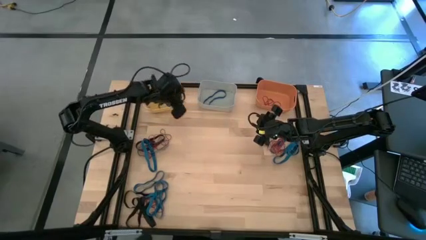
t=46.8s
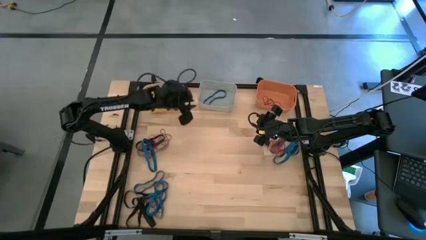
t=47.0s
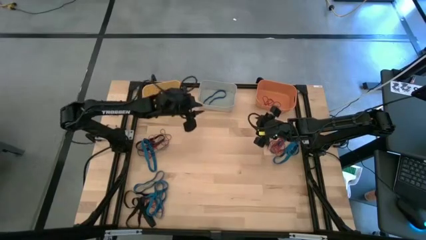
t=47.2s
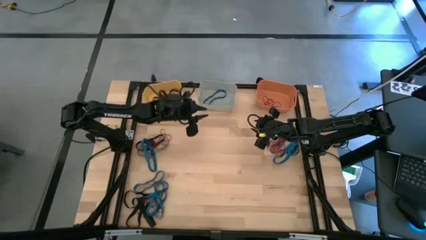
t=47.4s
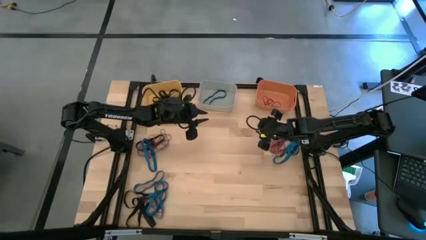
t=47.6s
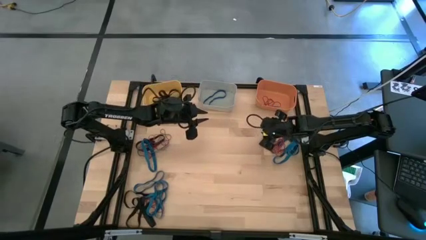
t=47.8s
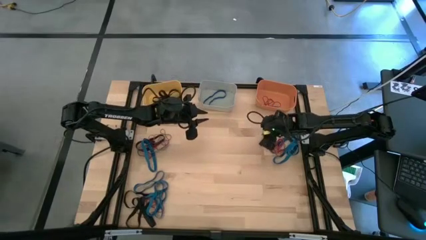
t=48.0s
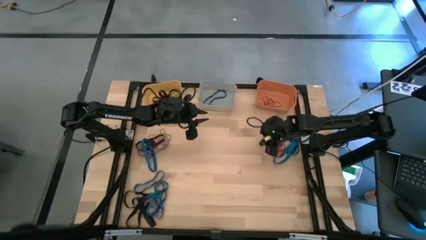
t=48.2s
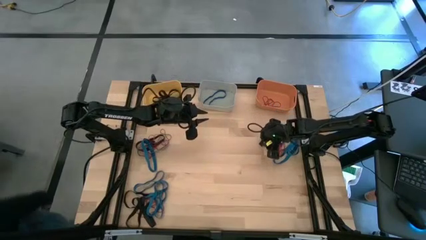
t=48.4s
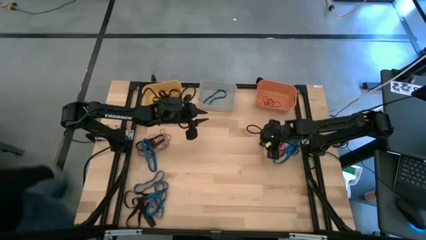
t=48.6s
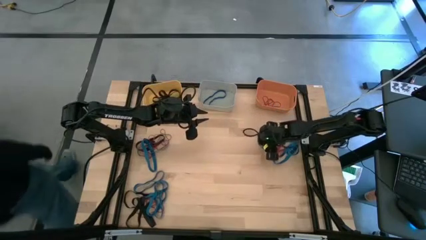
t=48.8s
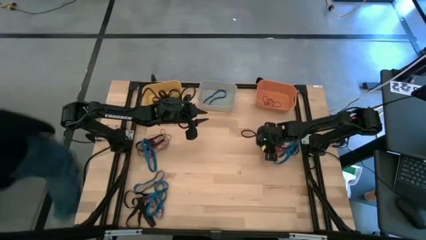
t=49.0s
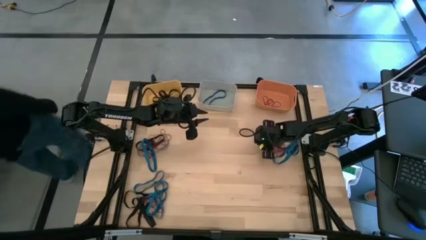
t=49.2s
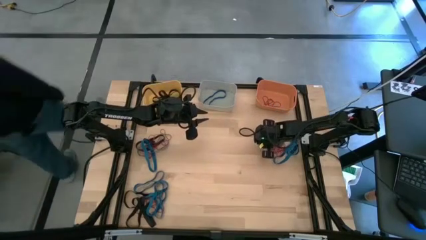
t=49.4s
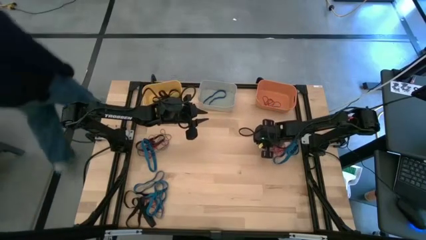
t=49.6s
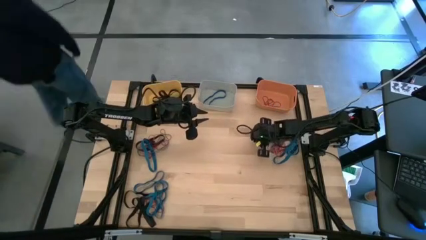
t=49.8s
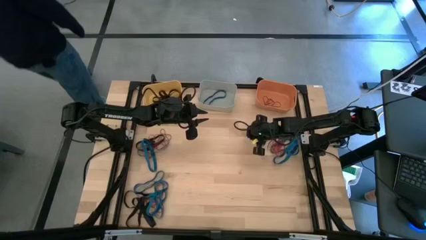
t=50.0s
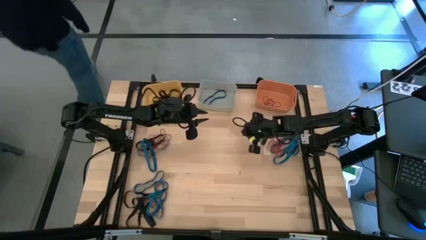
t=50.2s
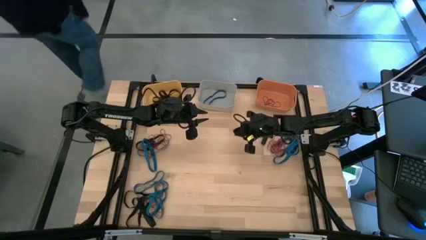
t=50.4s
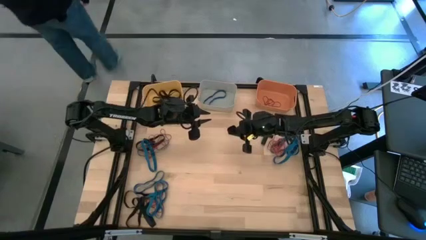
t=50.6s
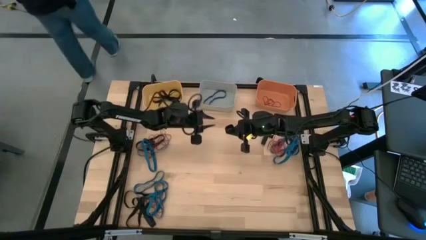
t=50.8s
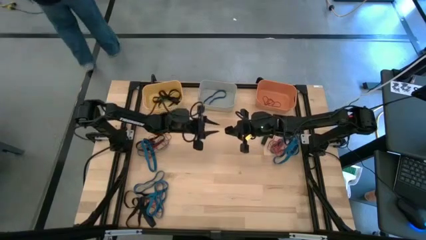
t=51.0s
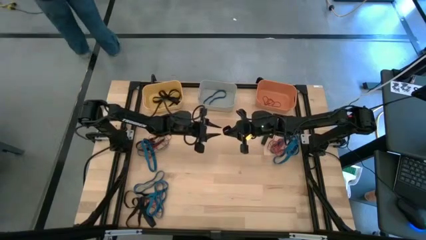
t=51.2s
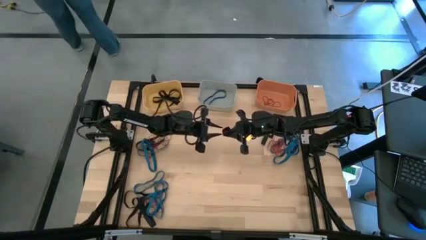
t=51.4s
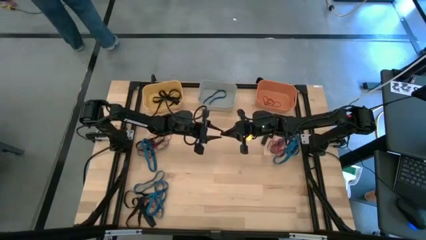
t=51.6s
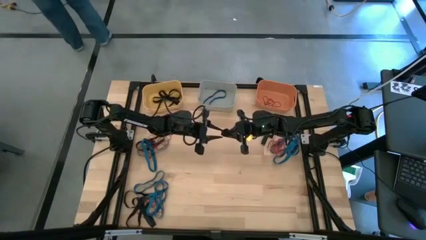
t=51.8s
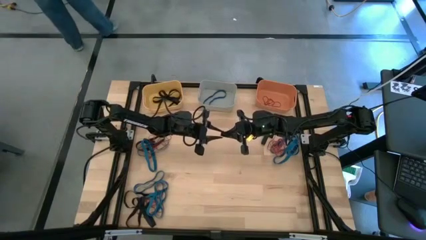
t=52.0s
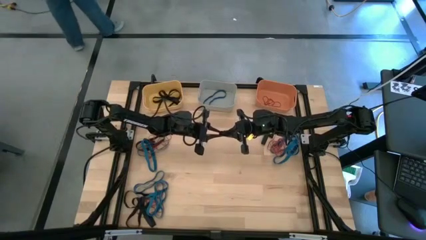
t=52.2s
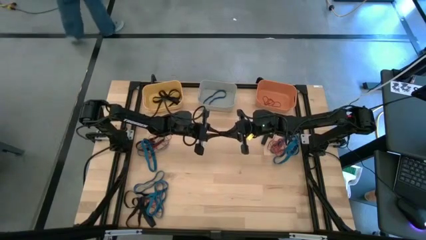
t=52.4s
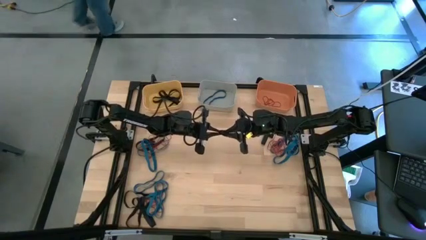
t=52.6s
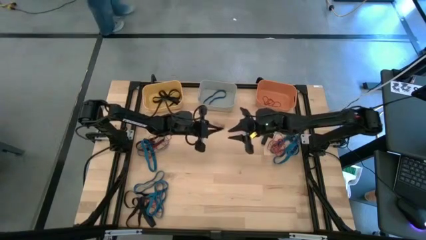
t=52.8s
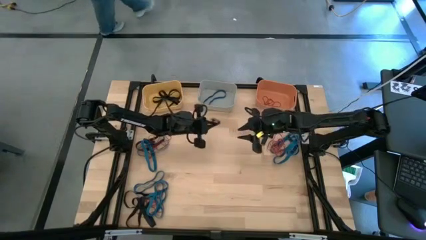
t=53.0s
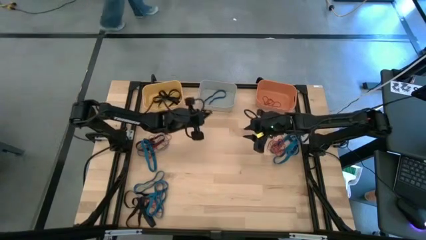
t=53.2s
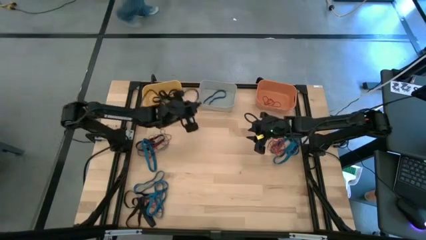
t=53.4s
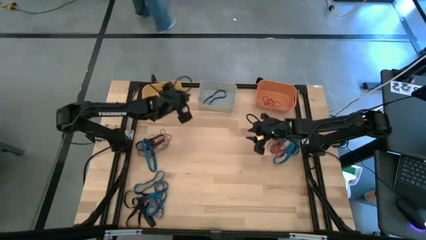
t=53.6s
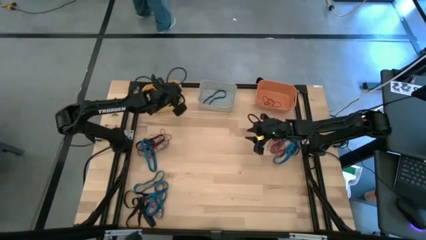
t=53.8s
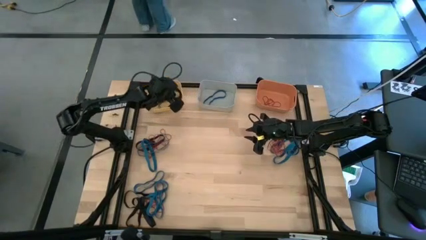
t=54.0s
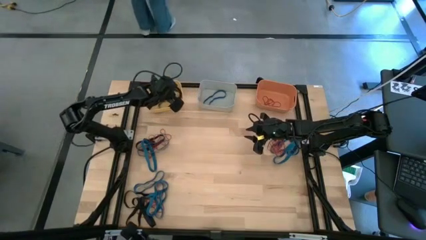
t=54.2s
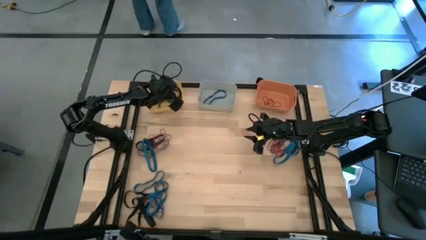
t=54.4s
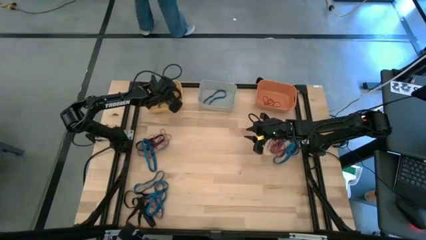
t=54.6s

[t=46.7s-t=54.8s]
Task: Sort rubber bands into baskets
Put the black rubber band into the yellow bin

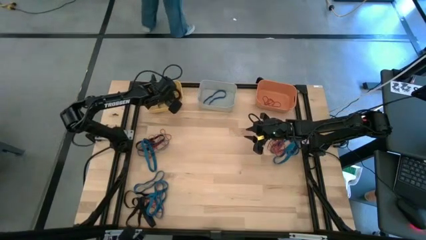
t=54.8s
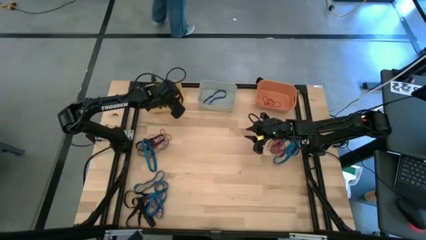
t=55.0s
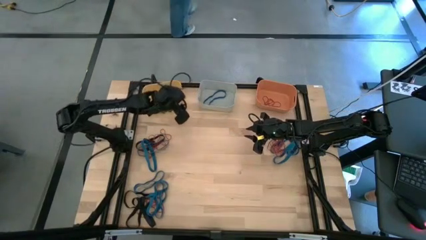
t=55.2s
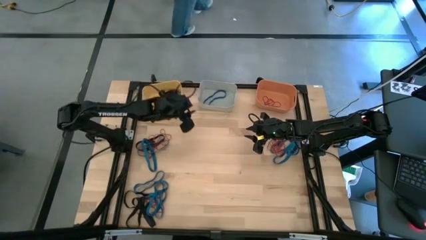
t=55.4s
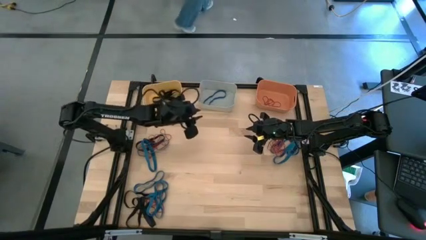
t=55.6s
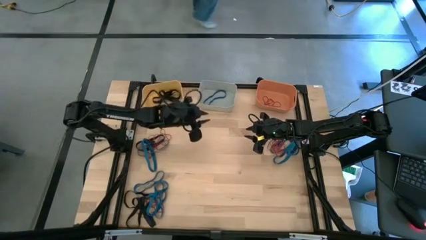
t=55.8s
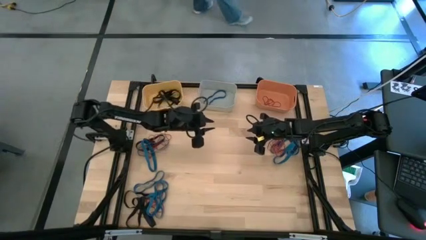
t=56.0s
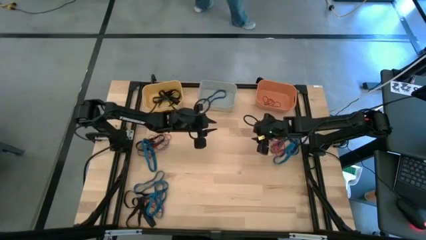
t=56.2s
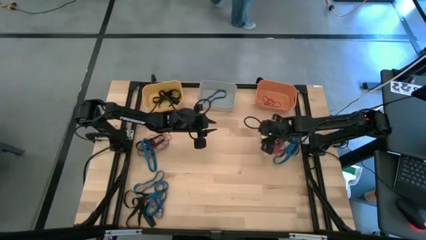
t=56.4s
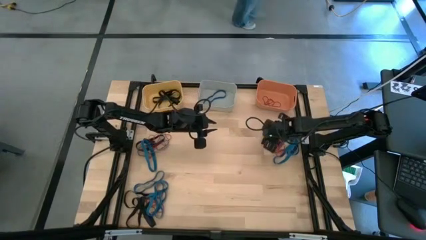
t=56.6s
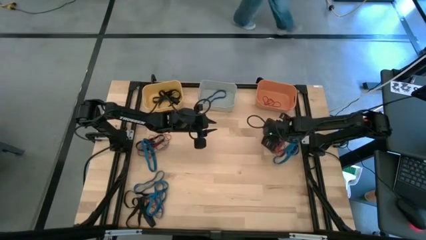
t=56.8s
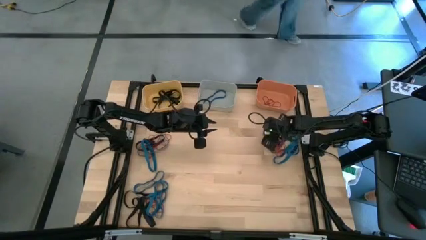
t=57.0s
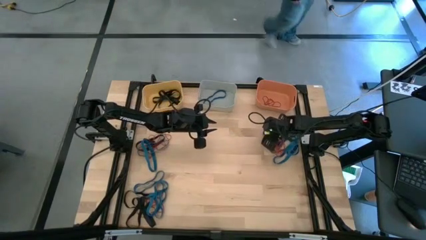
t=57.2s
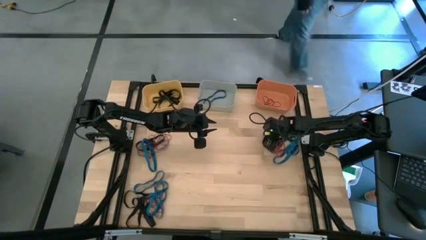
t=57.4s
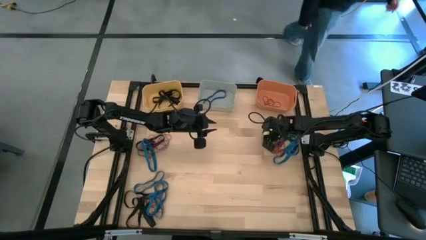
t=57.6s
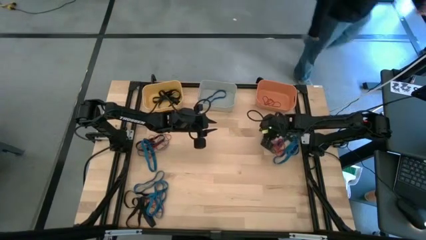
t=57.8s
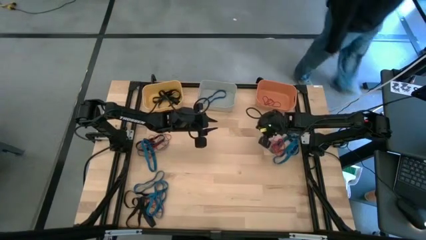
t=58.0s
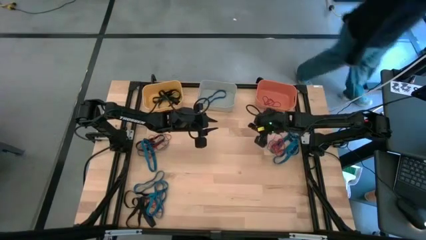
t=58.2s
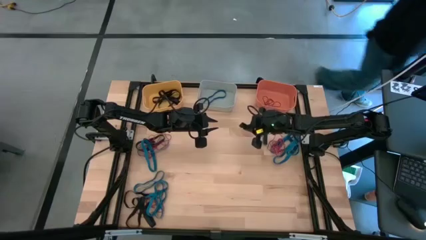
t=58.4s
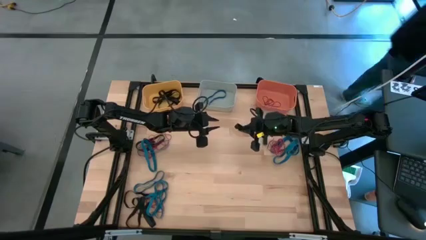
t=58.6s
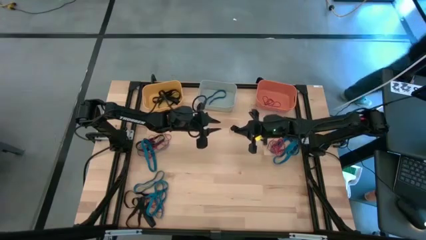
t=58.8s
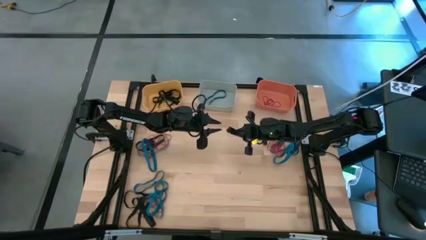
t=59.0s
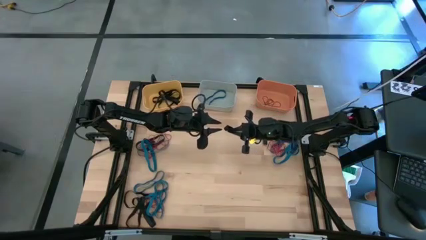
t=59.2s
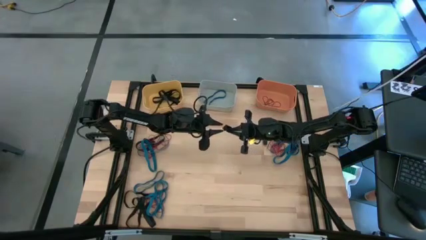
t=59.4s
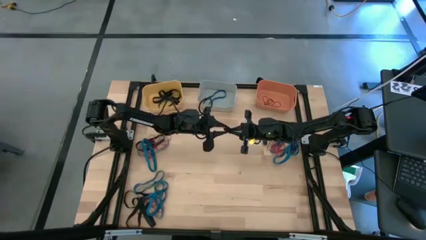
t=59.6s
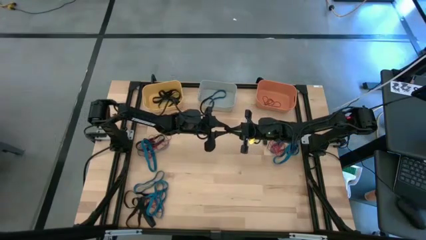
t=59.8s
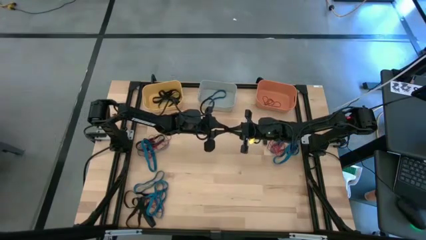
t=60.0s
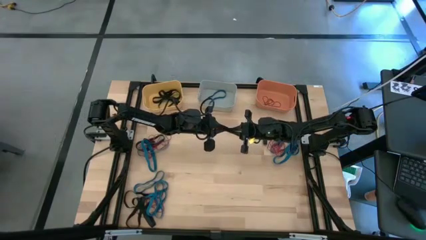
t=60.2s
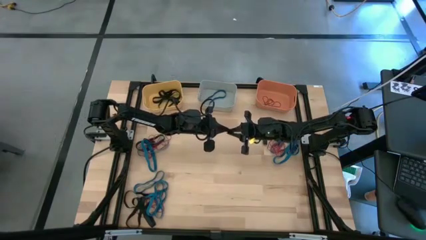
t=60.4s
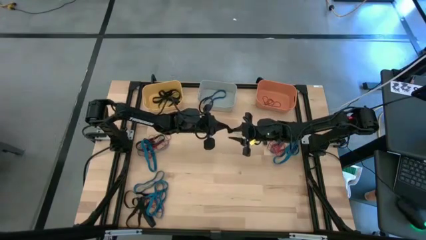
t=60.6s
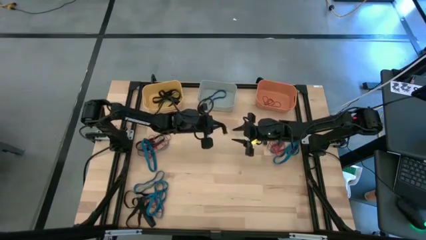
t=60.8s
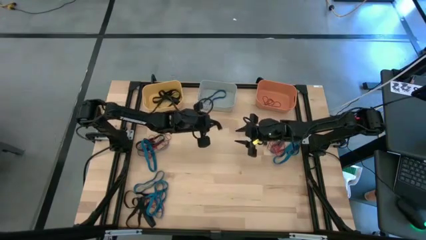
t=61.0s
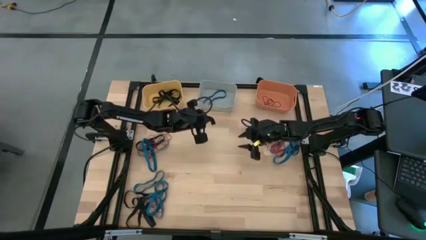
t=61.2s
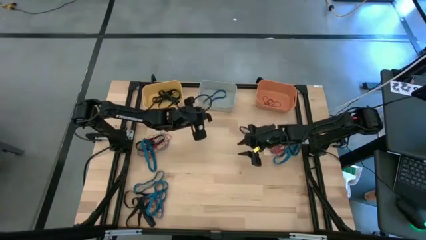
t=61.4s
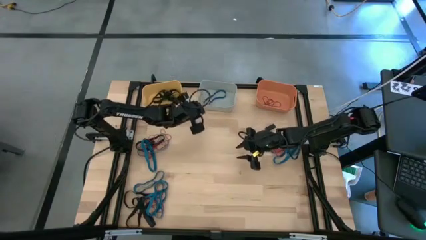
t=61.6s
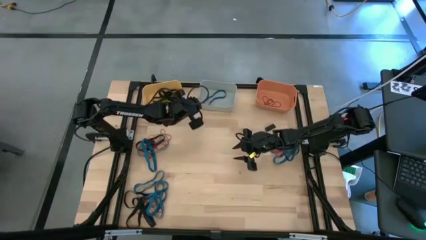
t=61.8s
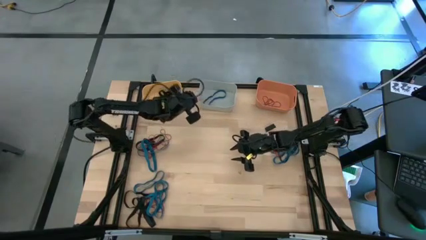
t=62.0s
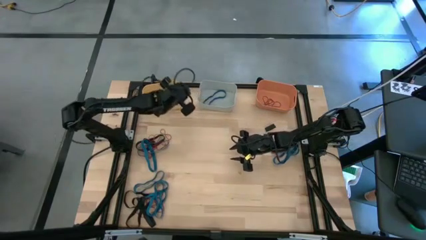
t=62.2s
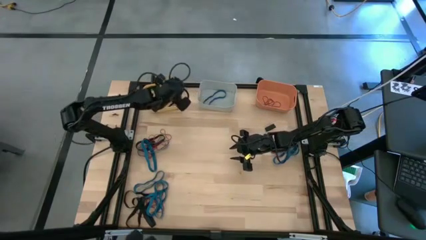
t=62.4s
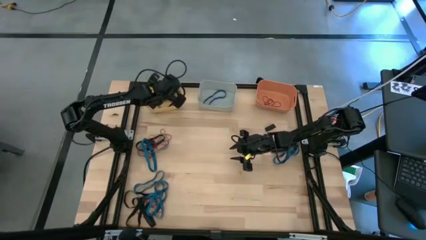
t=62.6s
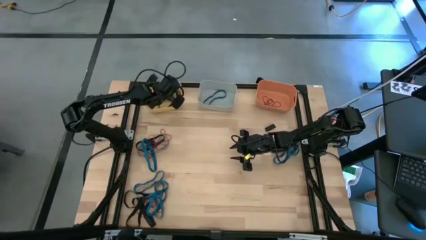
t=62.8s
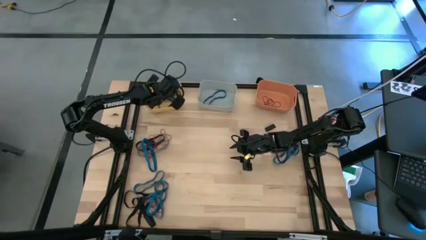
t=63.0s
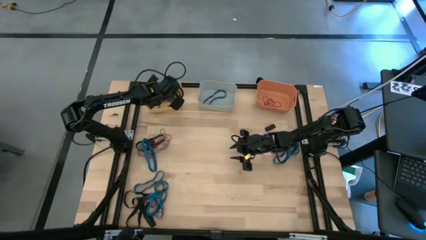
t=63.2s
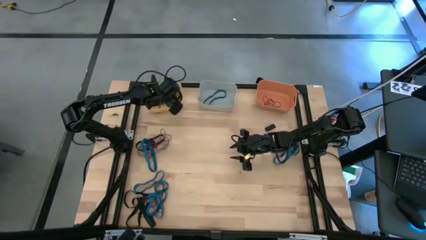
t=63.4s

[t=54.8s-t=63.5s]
Put the black rubber band into the yellow bin
